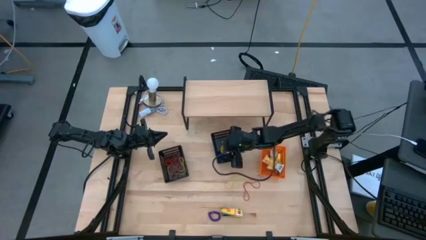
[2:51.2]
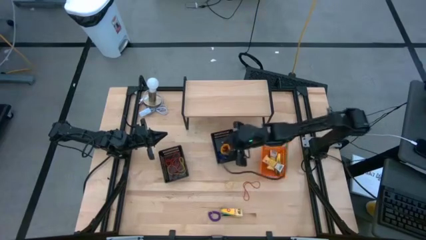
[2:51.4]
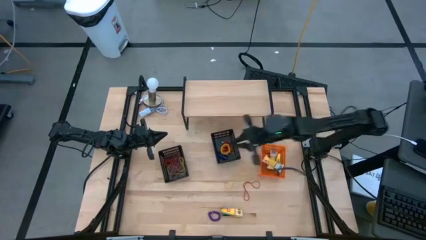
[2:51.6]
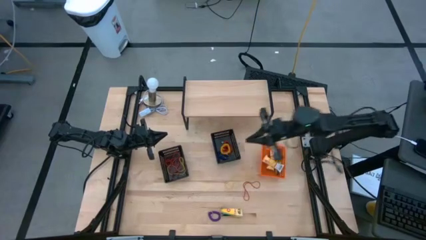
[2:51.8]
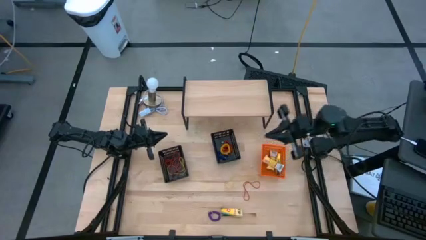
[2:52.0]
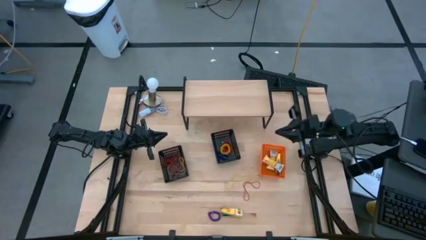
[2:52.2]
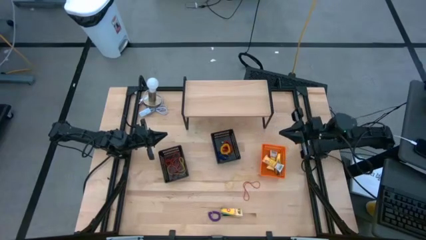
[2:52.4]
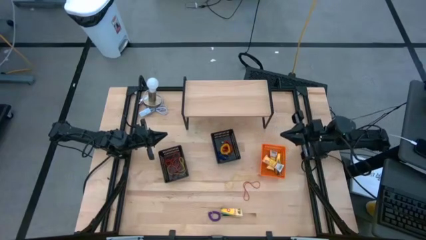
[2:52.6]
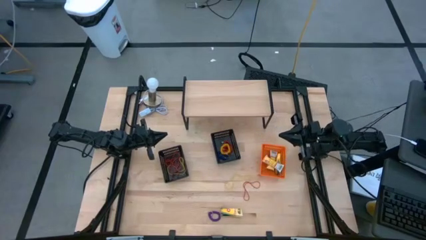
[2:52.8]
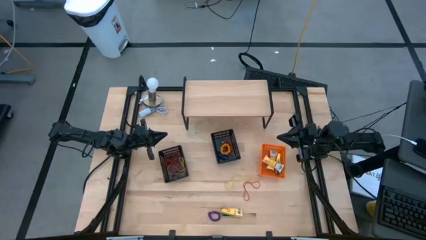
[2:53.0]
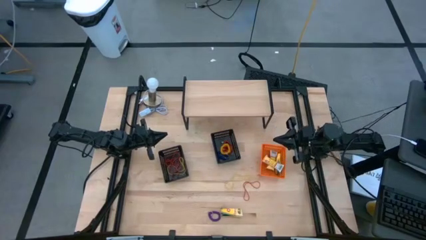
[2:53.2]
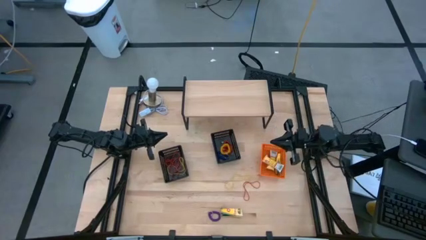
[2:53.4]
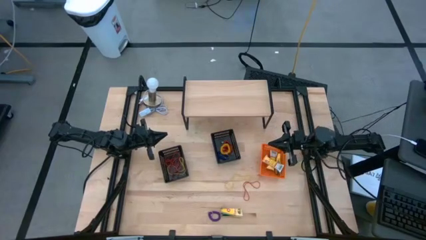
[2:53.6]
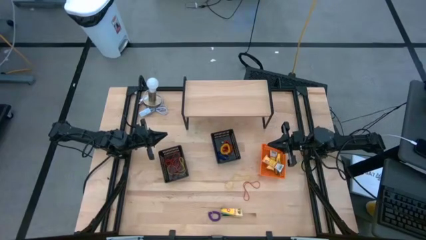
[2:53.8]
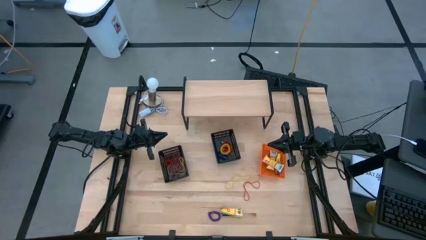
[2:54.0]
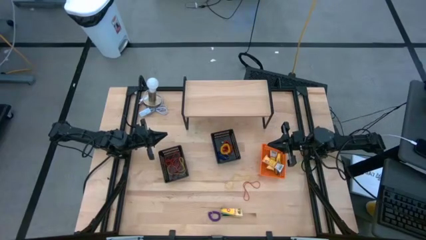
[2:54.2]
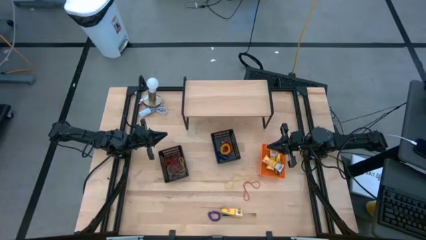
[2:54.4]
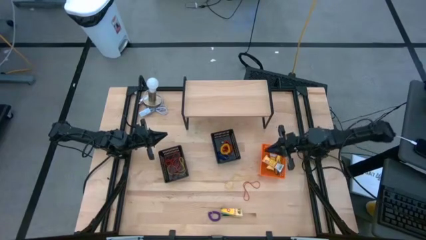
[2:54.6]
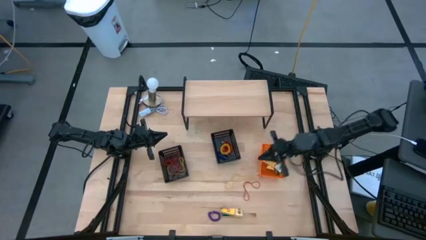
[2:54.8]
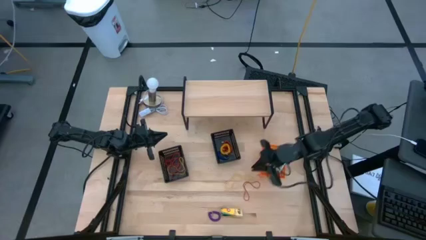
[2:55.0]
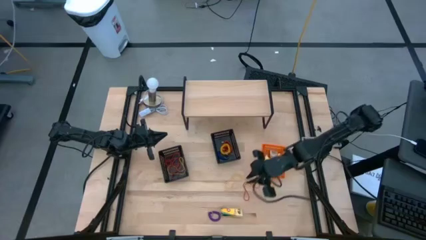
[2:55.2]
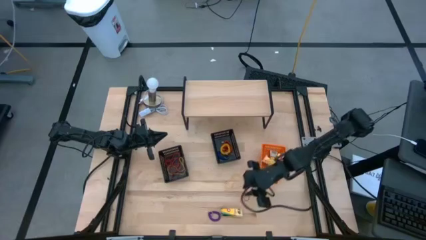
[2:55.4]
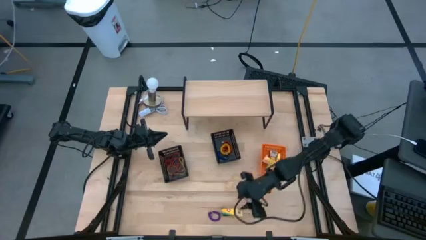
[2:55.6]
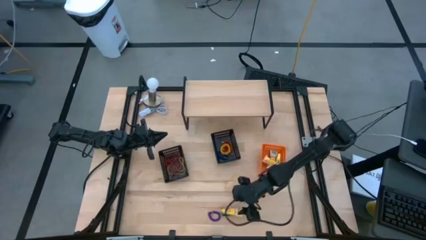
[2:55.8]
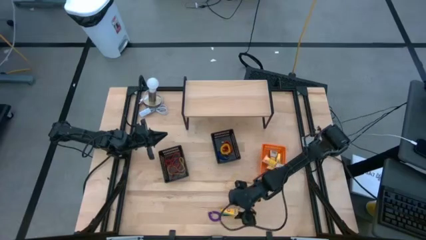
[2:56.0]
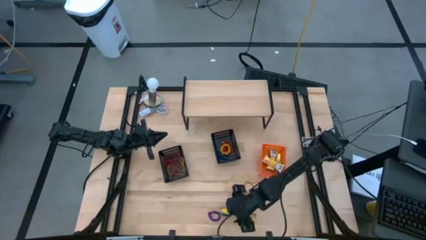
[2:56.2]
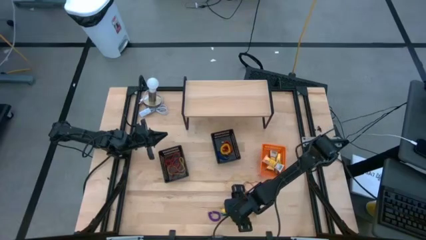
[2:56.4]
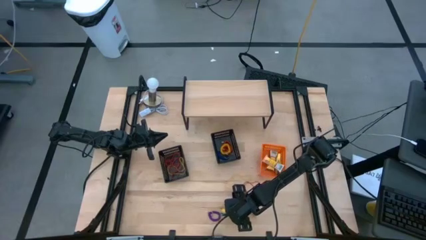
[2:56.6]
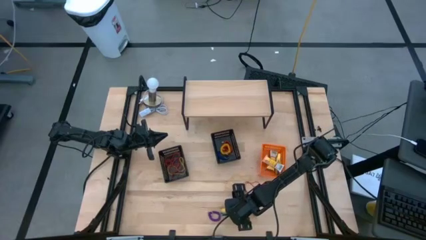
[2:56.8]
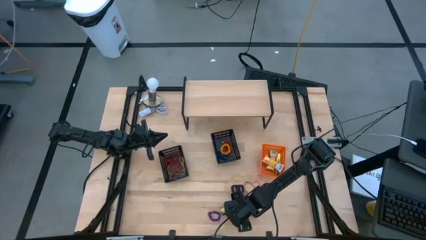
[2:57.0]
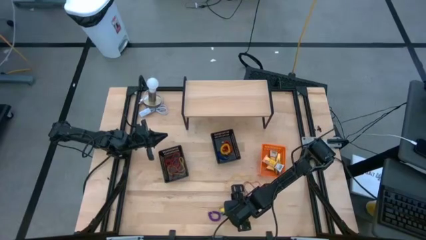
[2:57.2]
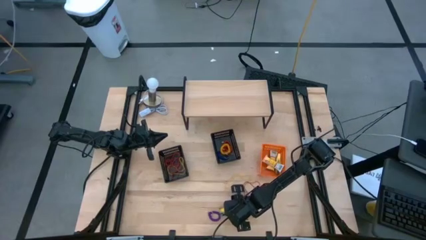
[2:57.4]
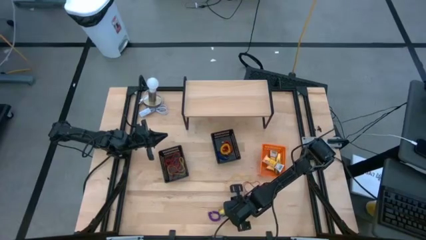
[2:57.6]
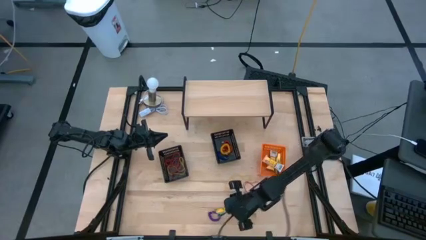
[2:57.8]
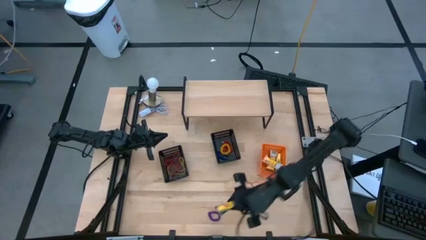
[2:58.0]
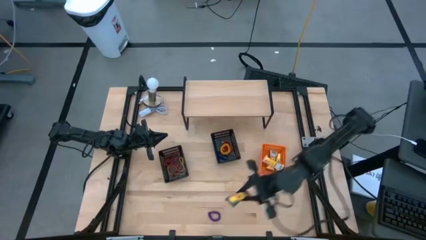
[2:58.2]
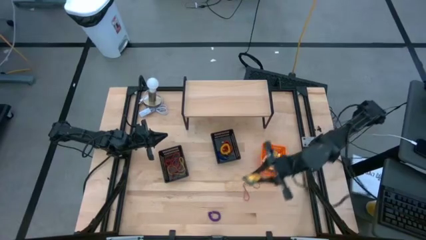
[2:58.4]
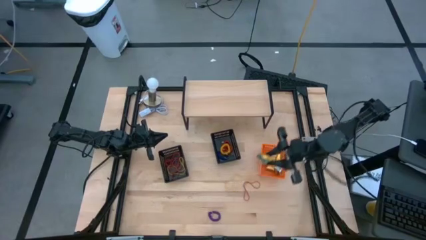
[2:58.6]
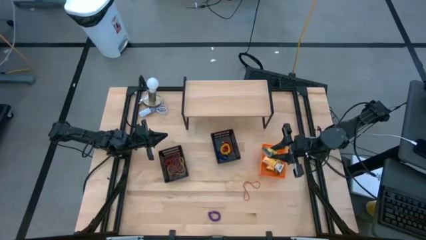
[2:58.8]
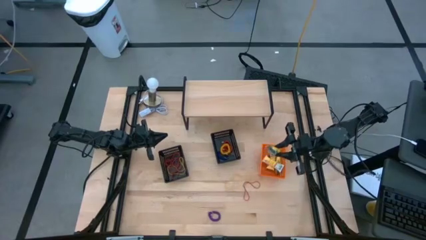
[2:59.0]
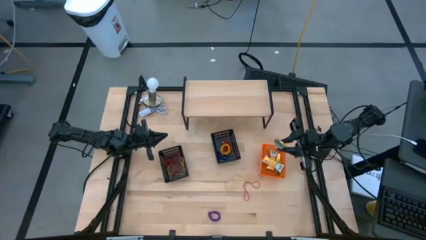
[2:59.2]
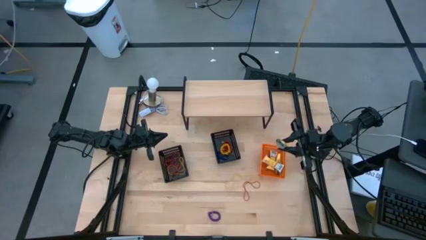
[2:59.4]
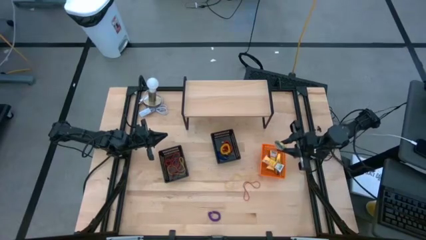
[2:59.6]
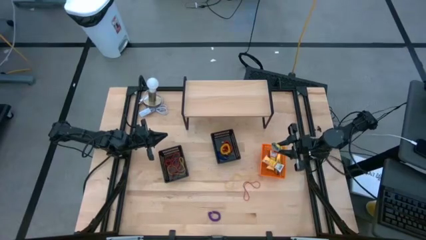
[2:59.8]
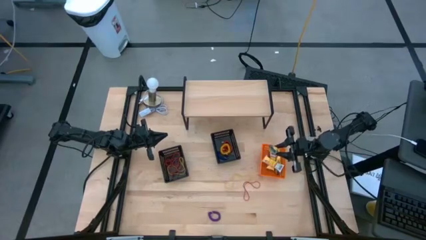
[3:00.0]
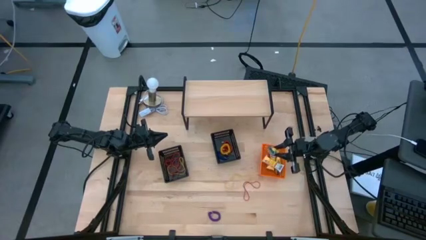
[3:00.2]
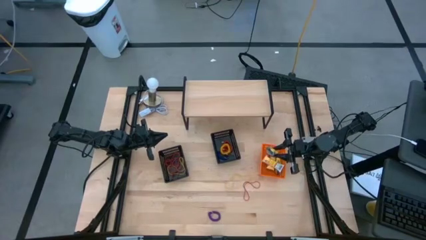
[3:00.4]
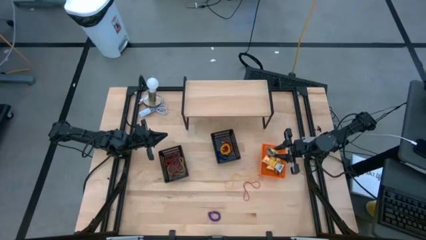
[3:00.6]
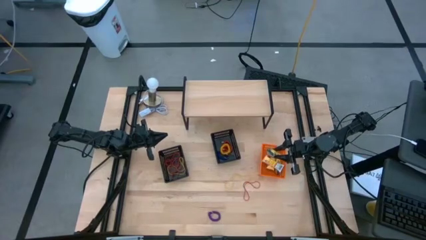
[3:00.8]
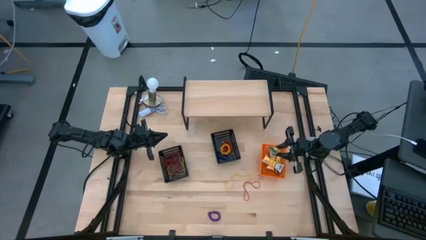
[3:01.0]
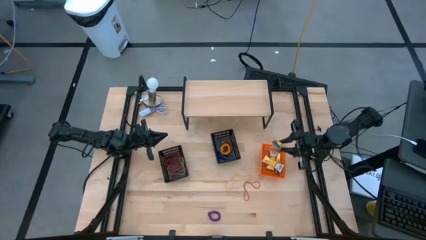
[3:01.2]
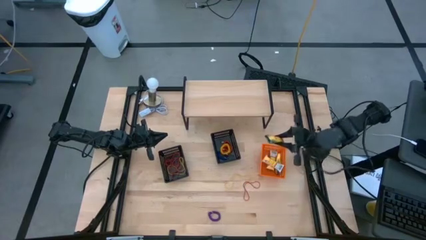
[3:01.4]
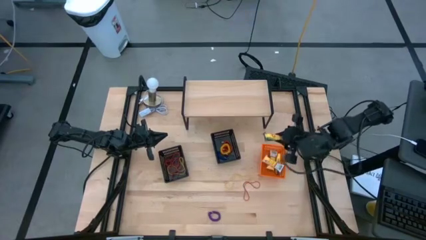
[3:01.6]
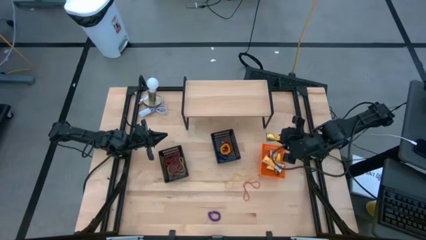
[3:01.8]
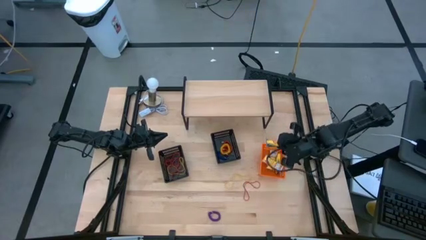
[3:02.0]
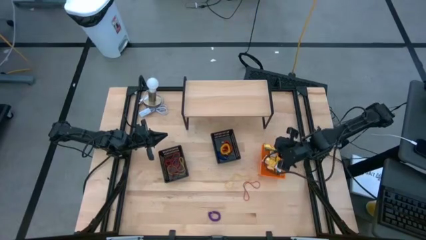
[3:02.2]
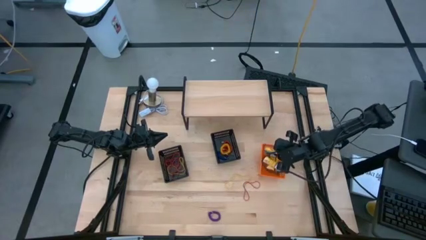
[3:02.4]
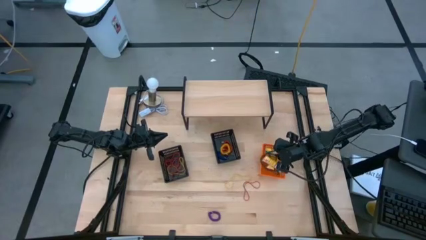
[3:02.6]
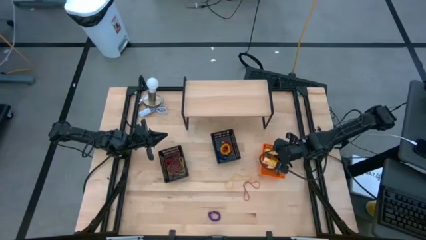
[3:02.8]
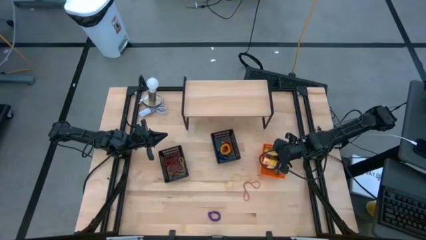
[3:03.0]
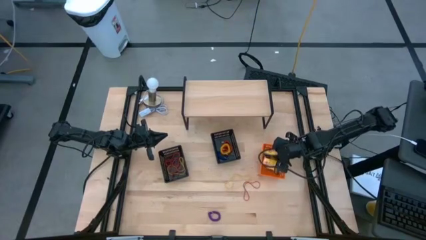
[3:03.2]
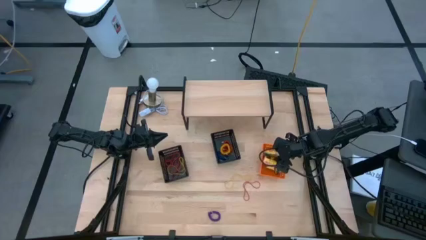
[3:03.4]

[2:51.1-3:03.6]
Task: Pick & Place Office Desk Supplies
Put the crayon box into the orange bin
